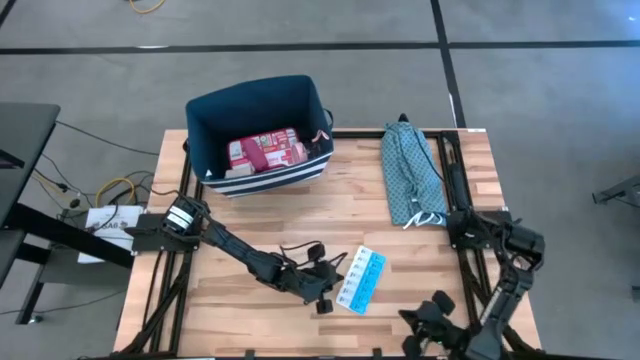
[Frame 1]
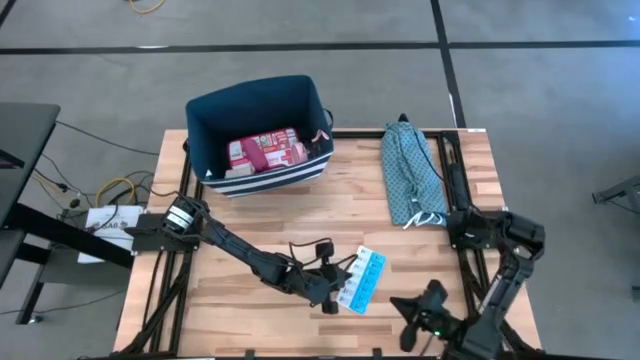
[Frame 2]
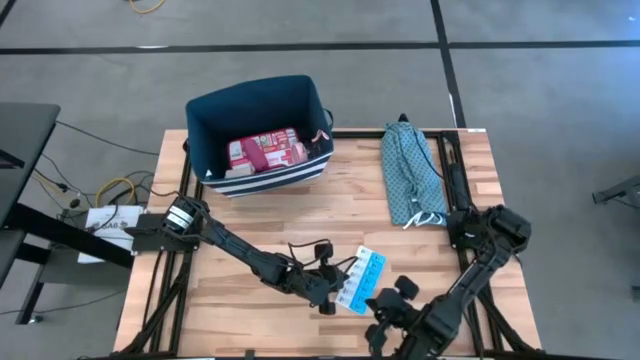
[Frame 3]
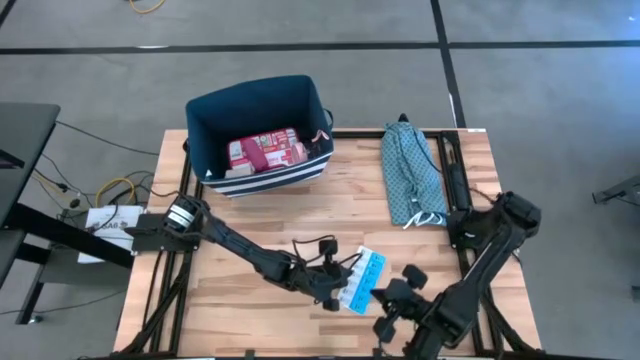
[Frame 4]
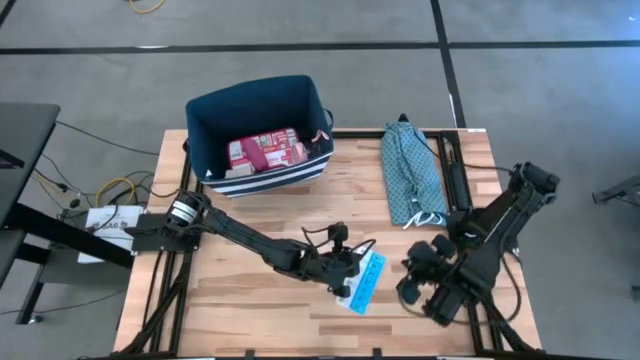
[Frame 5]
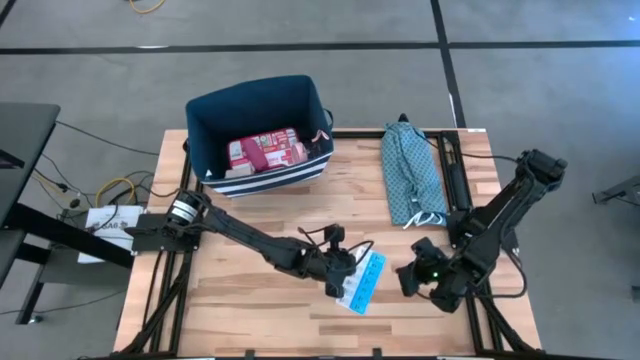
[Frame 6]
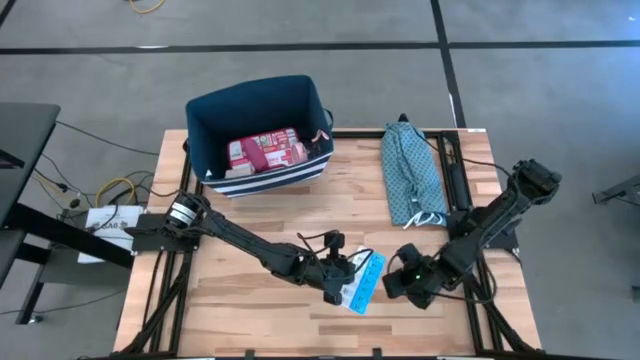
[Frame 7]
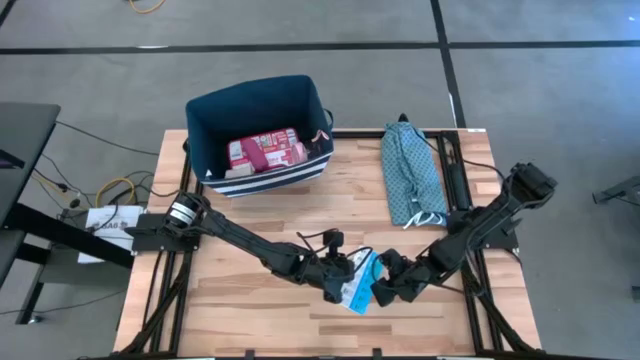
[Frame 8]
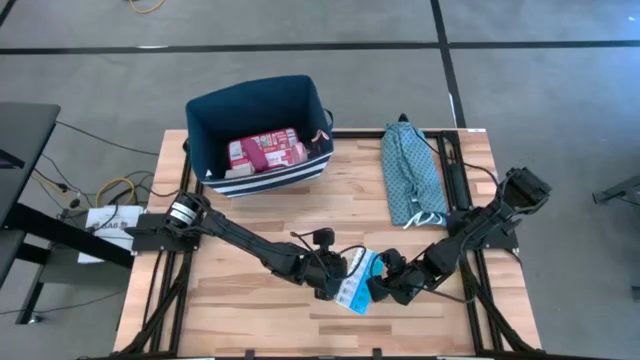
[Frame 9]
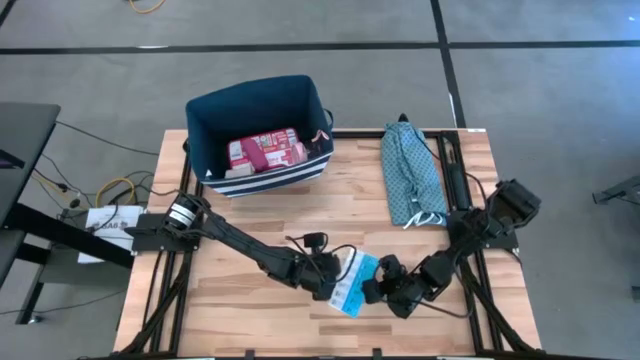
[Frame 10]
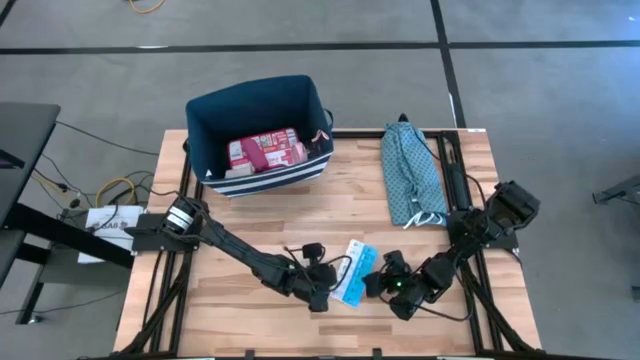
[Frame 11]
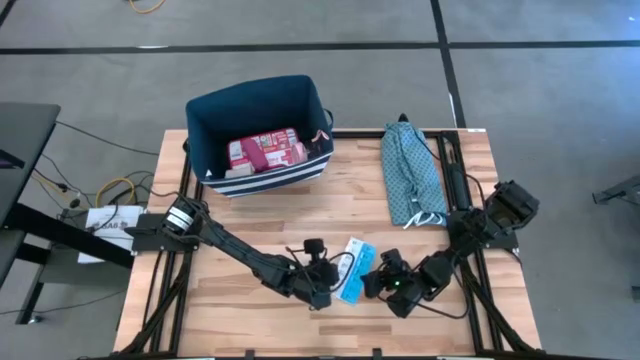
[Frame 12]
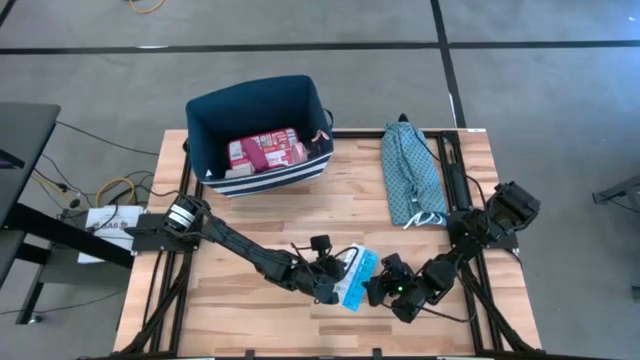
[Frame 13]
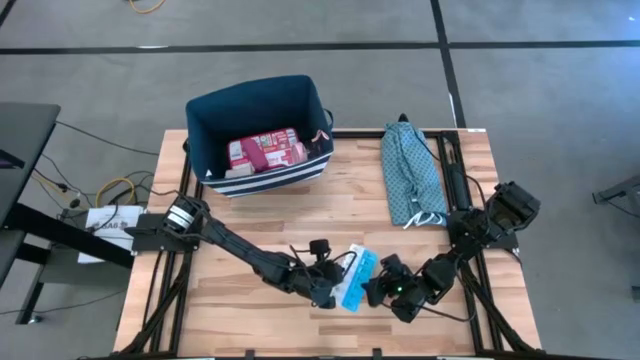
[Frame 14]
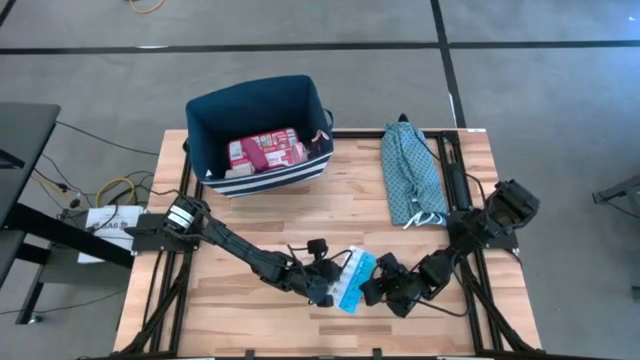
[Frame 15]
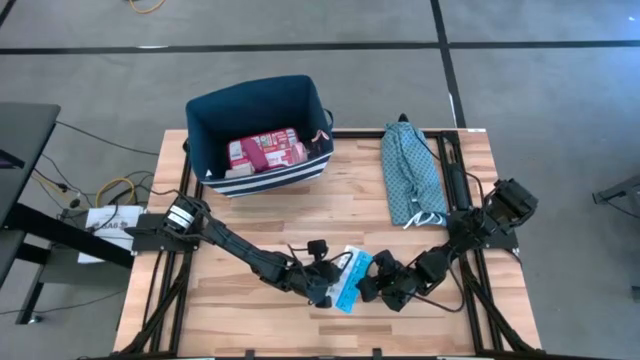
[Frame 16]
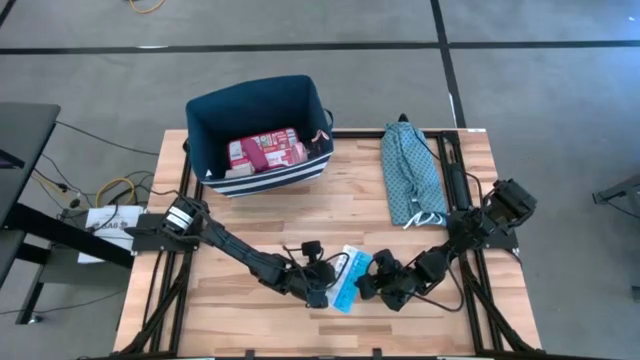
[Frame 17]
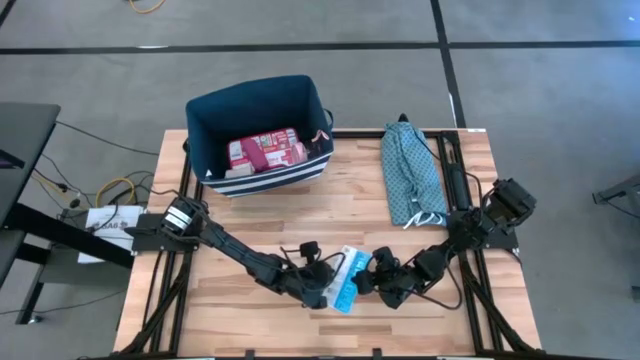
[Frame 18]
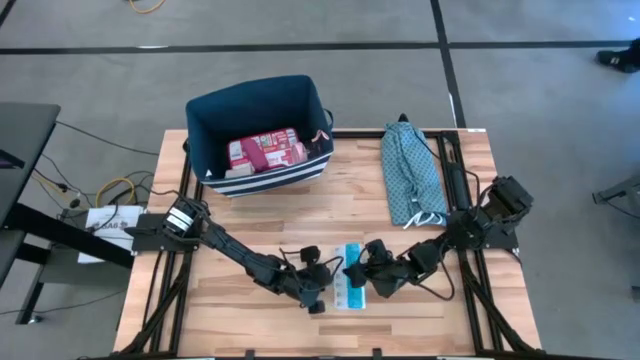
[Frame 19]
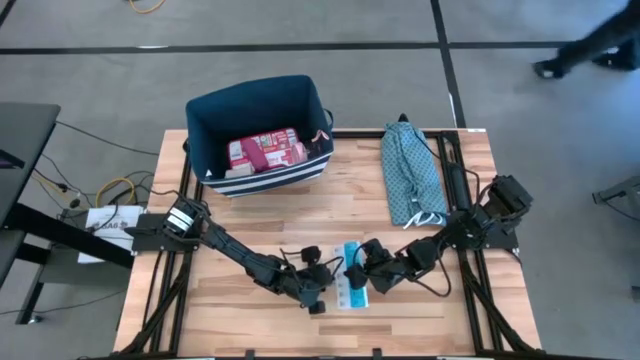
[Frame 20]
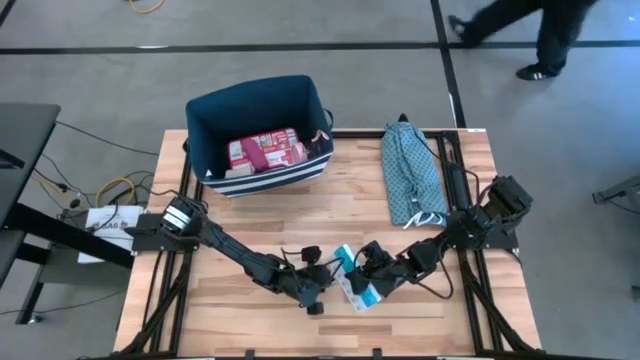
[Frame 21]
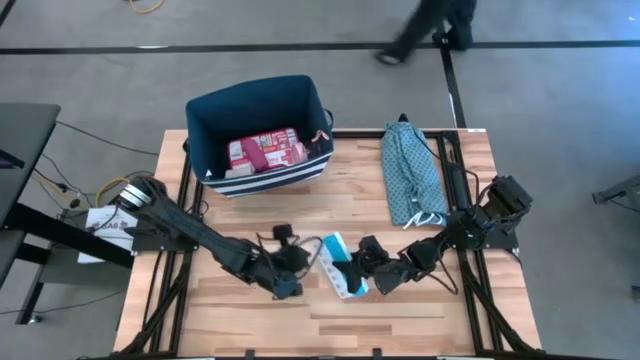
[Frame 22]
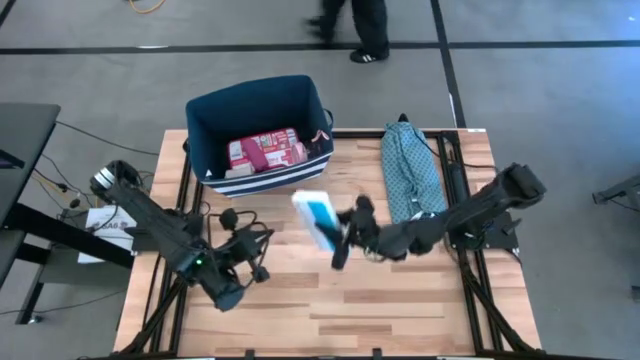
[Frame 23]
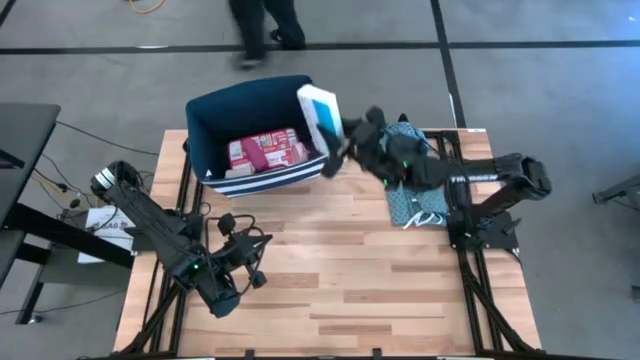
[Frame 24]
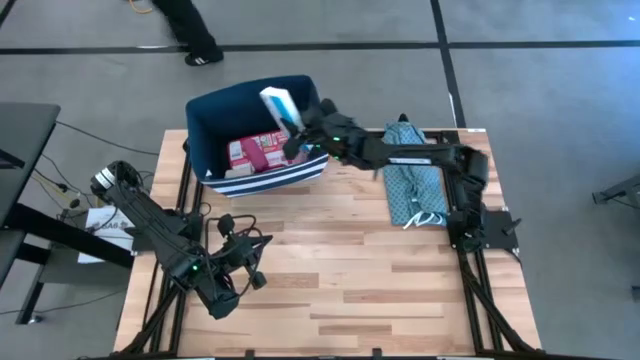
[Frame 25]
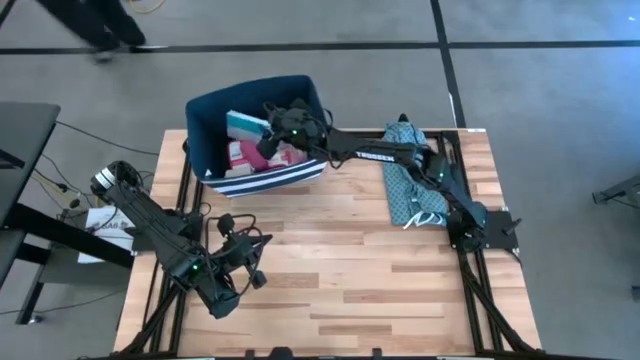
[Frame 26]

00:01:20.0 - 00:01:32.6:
Task: Pick & place medical supplies in basket/bin
Put the white pill organizer into the blue bin

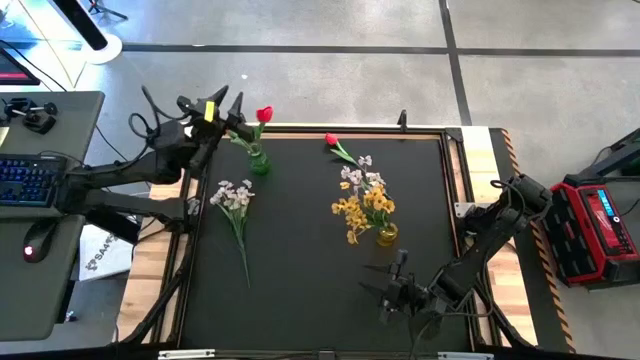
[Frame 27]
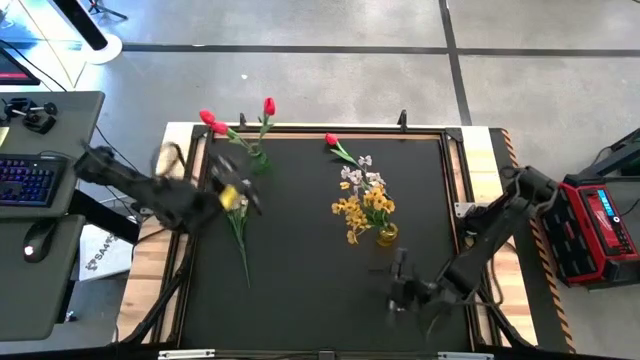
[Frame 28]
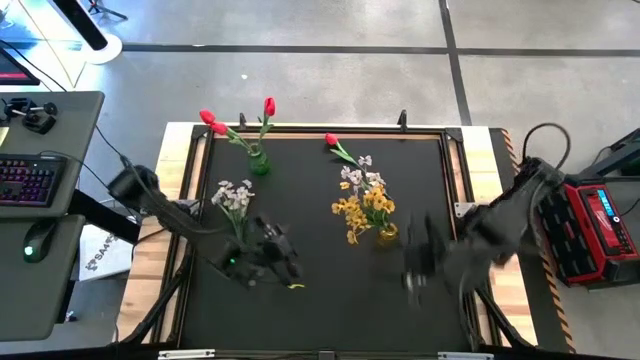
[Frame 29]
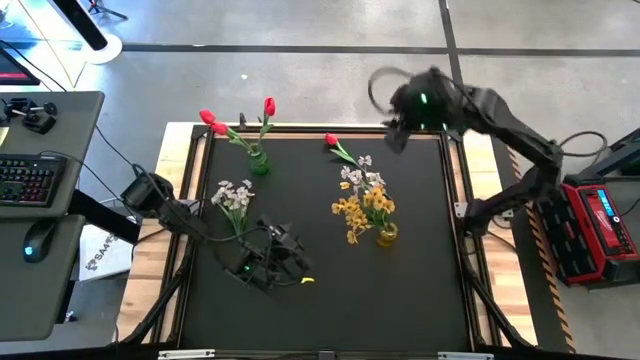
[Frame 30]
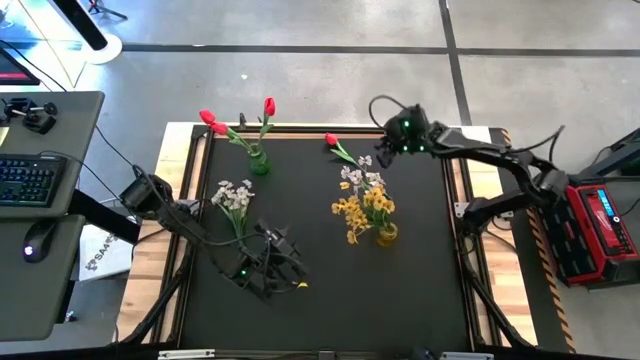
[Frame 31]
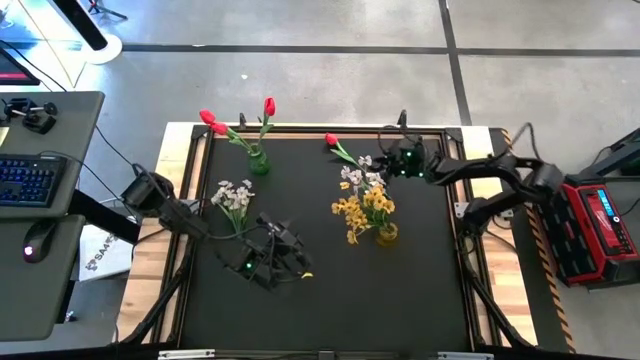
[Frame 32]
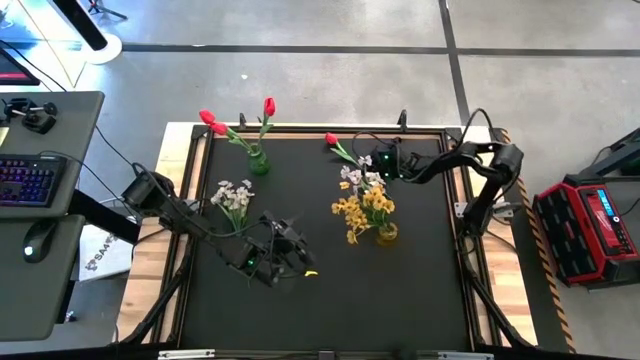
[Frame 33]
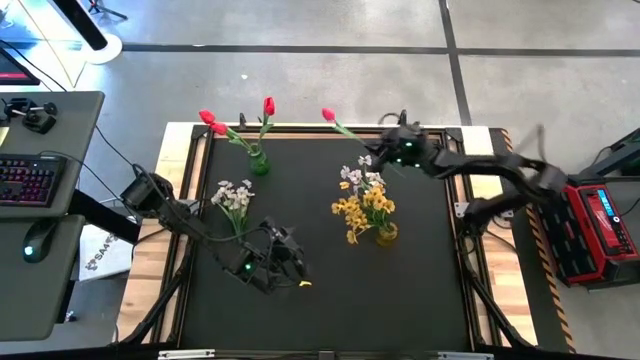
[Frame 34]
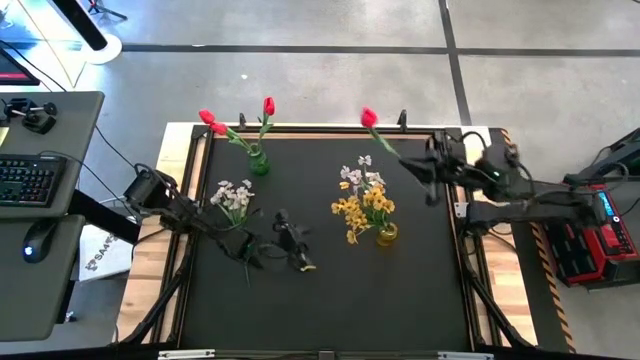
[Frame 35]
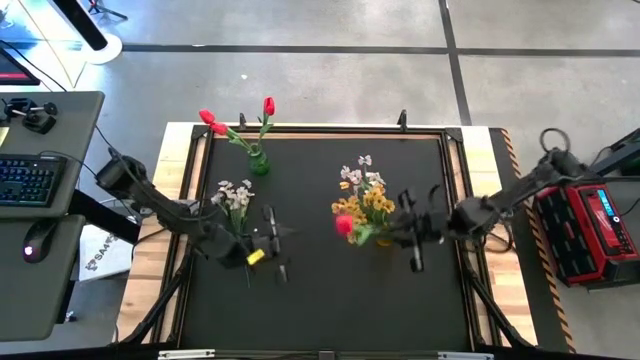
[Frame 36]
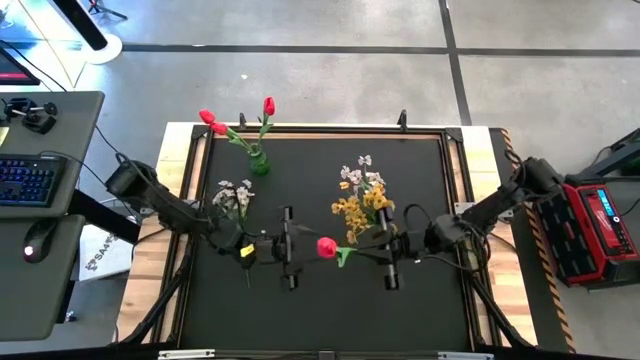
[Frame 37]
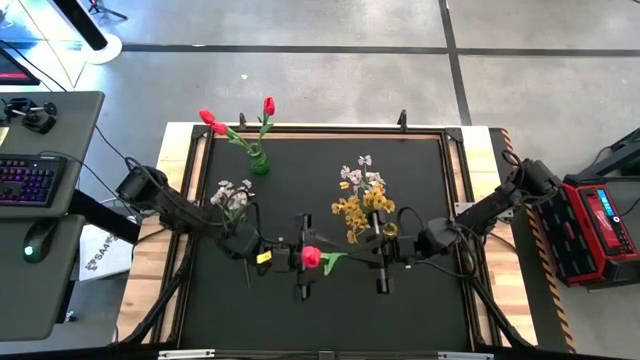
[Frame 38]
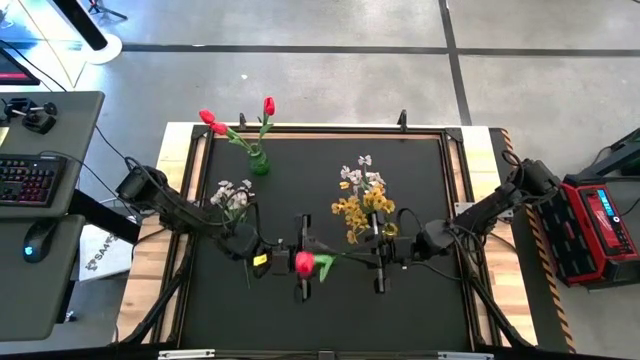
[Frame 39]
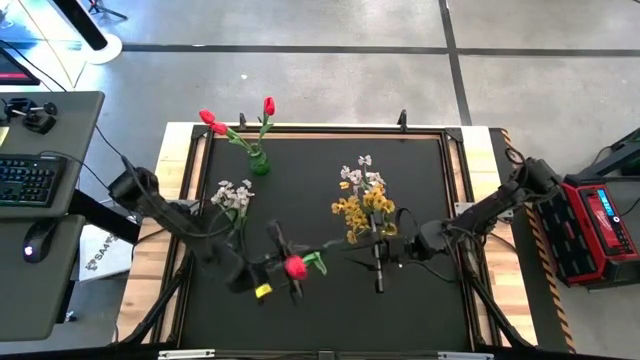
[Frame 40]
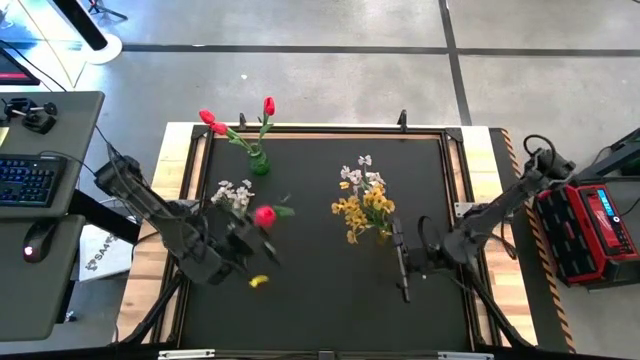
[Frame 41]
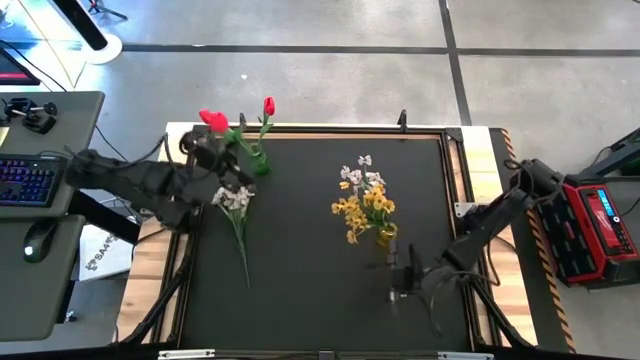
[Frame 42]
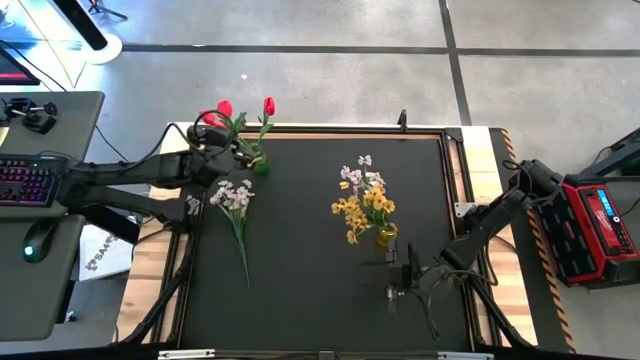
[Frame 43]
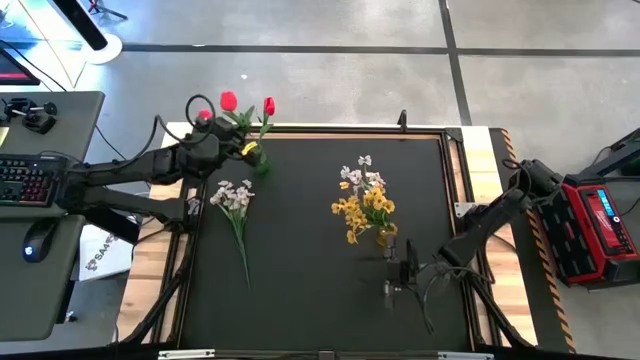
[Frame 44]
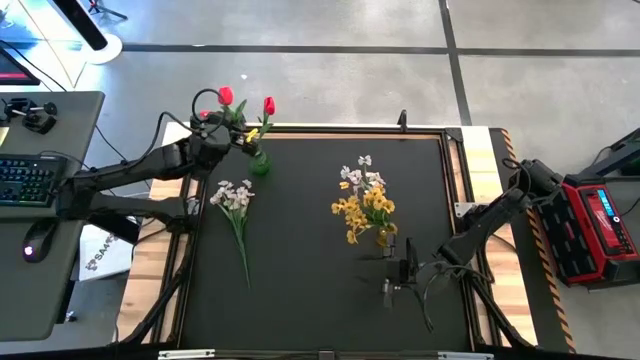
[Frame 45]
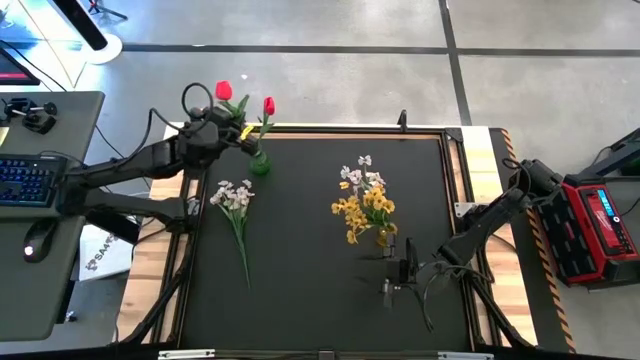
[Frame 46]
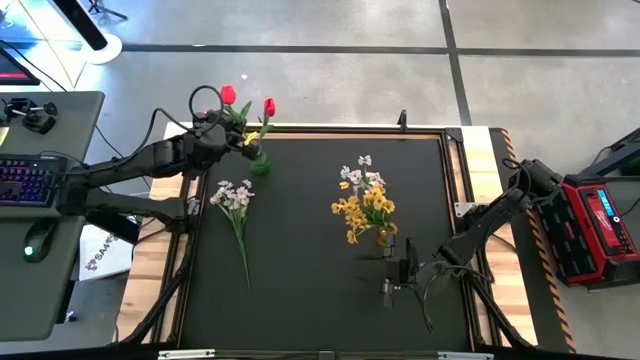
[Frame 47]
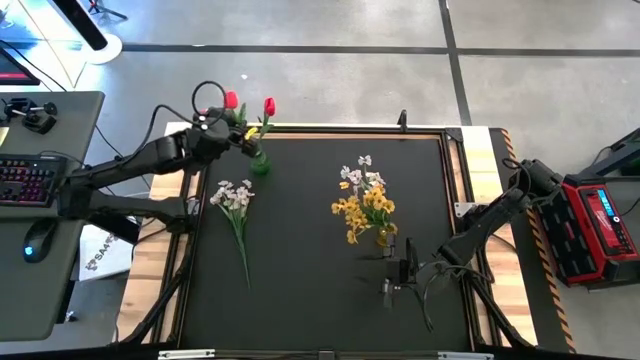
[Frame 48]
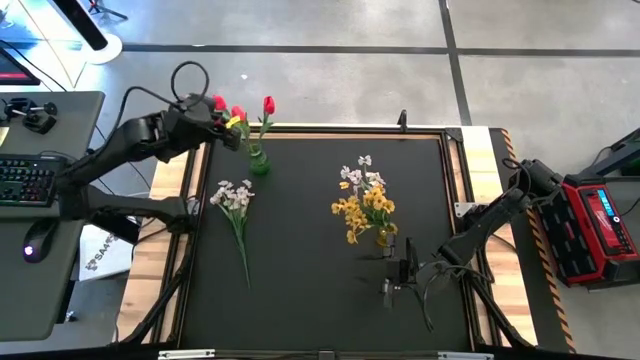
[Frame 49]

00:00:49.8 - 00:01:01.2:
Task: Sort flowers into vase by color
Put the red tulip in the green vase
